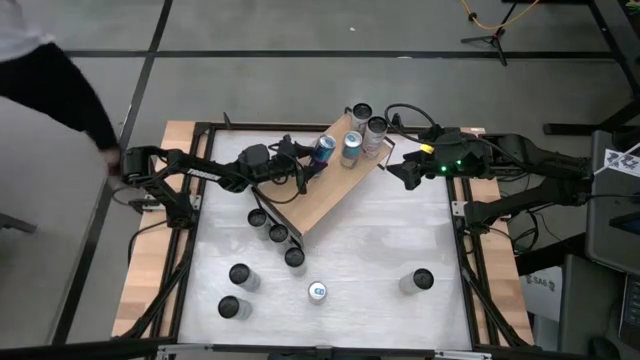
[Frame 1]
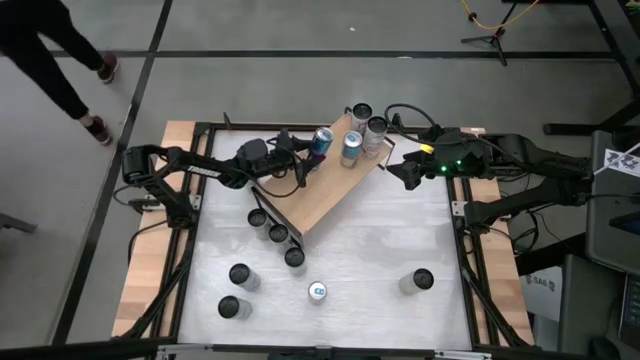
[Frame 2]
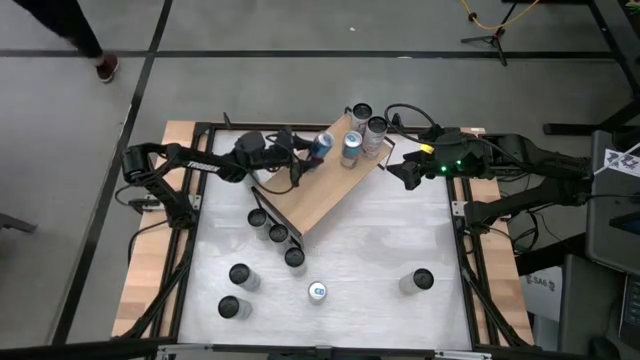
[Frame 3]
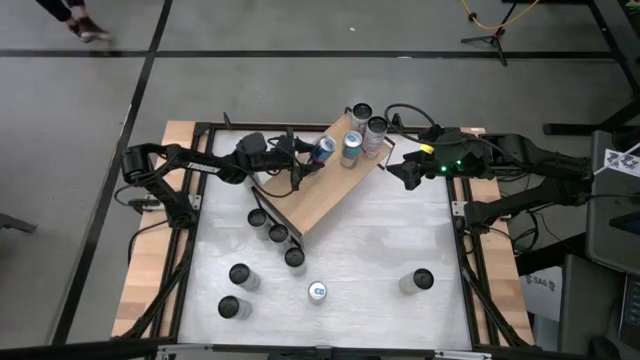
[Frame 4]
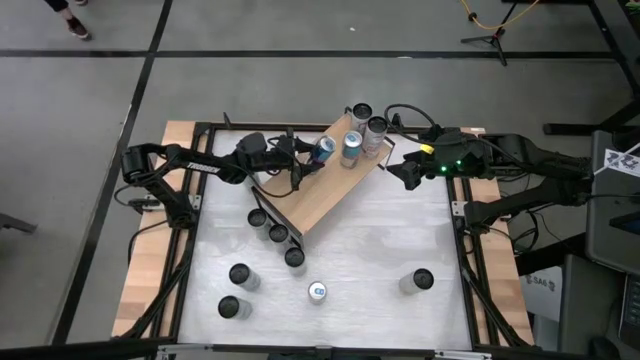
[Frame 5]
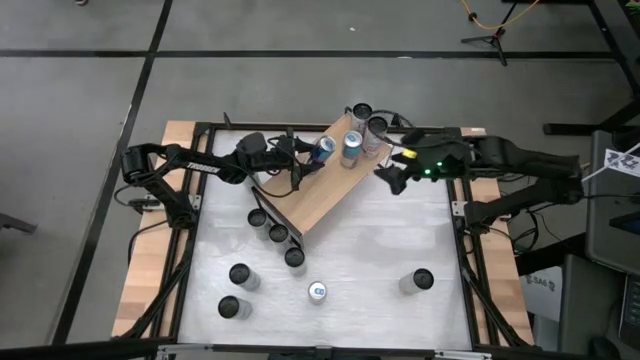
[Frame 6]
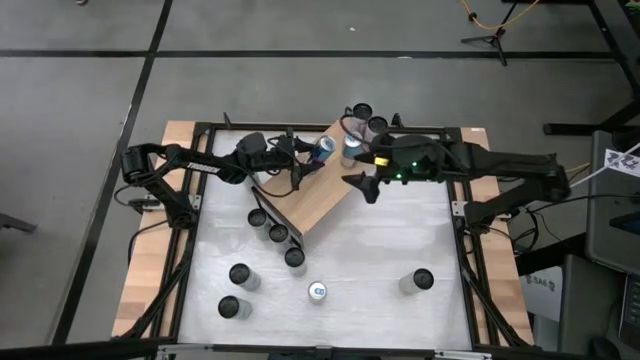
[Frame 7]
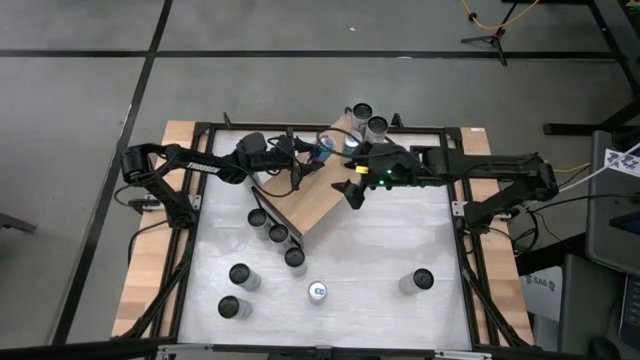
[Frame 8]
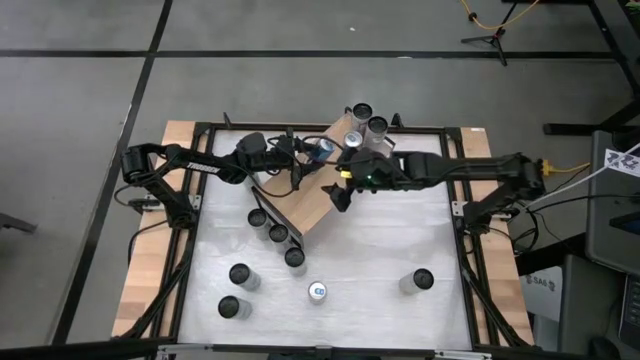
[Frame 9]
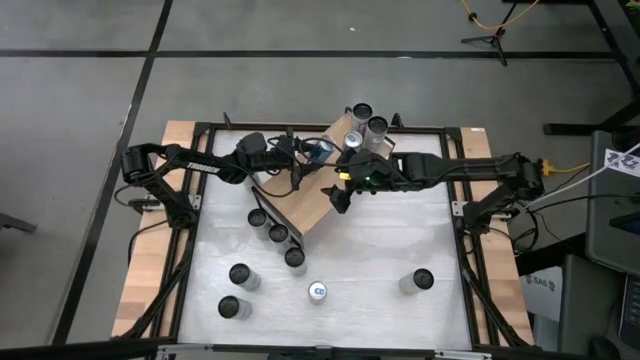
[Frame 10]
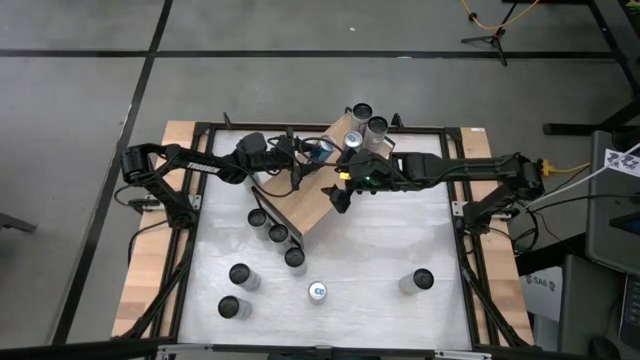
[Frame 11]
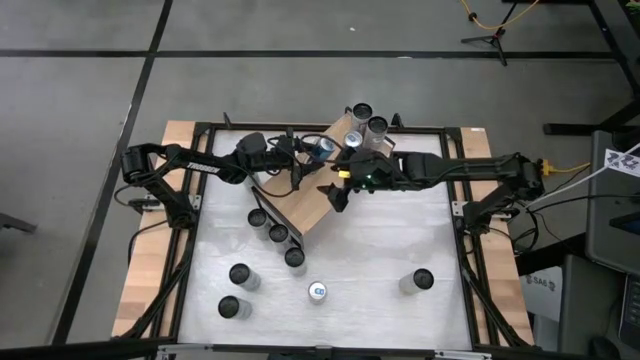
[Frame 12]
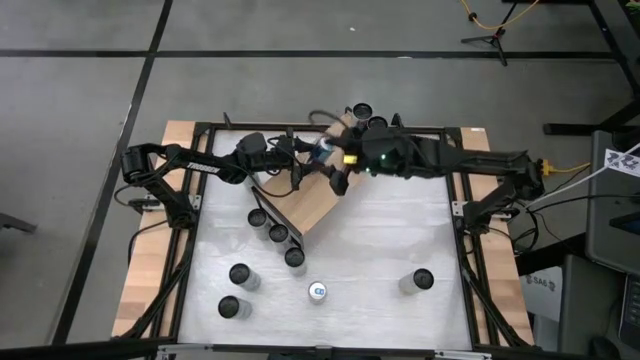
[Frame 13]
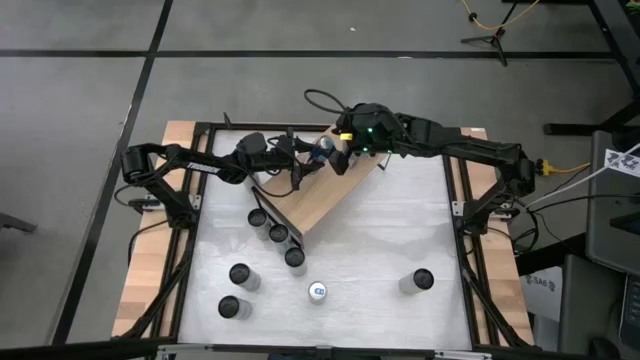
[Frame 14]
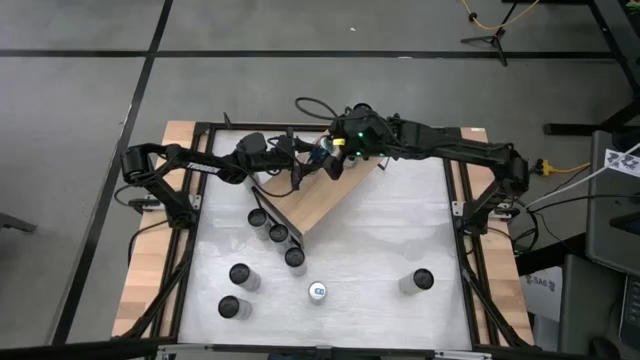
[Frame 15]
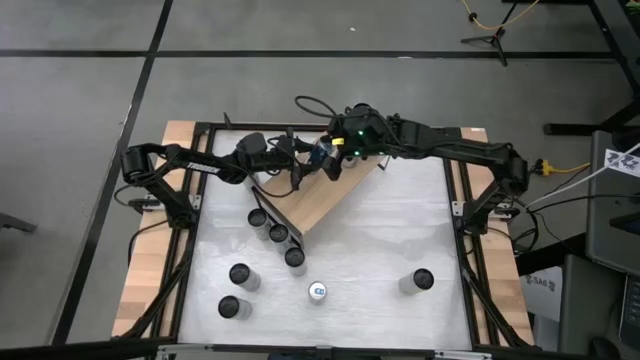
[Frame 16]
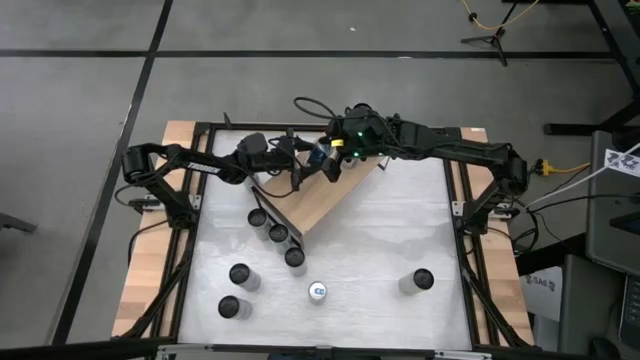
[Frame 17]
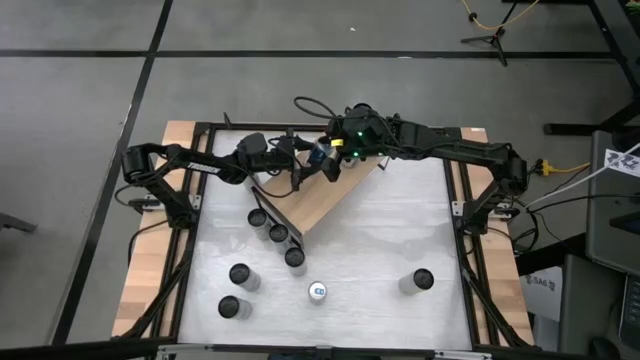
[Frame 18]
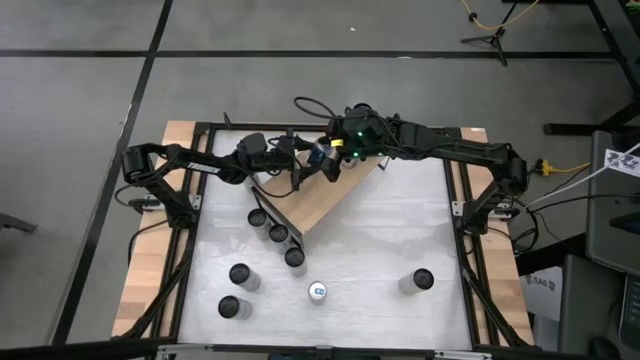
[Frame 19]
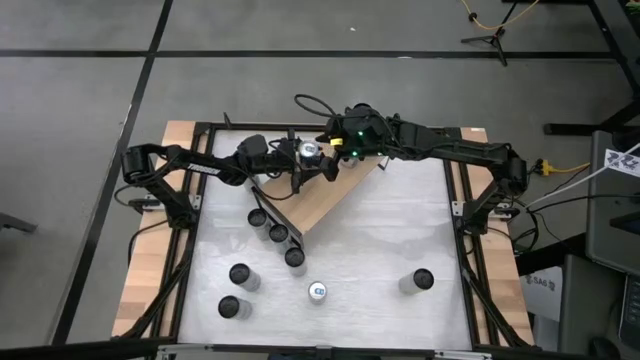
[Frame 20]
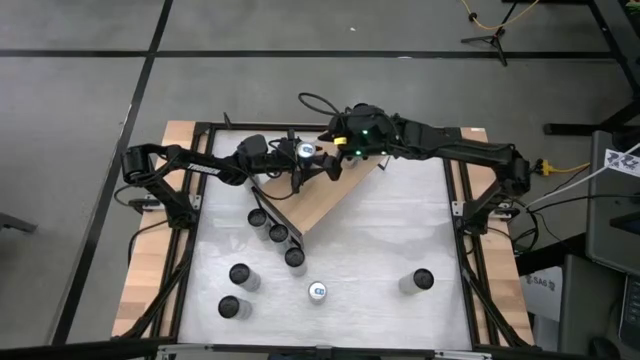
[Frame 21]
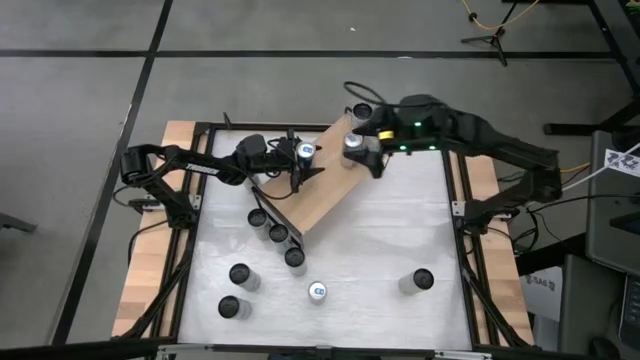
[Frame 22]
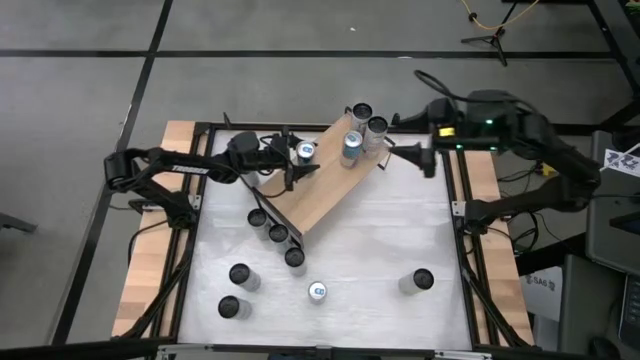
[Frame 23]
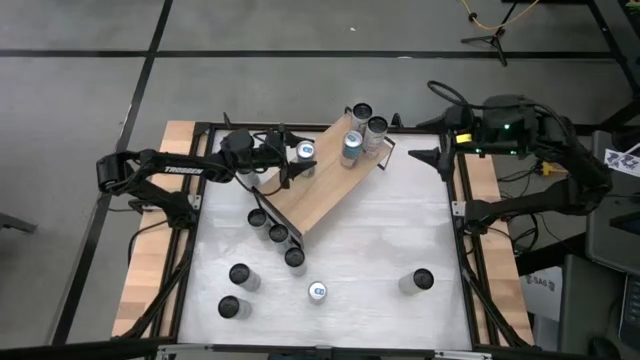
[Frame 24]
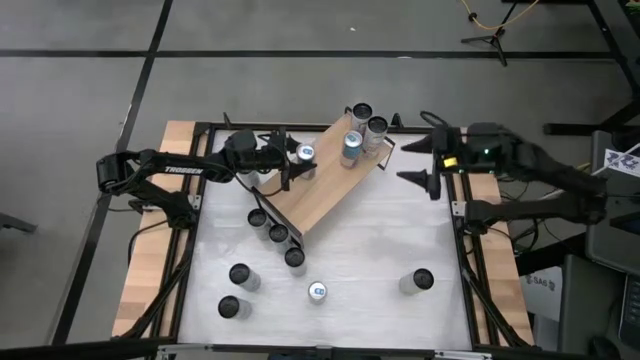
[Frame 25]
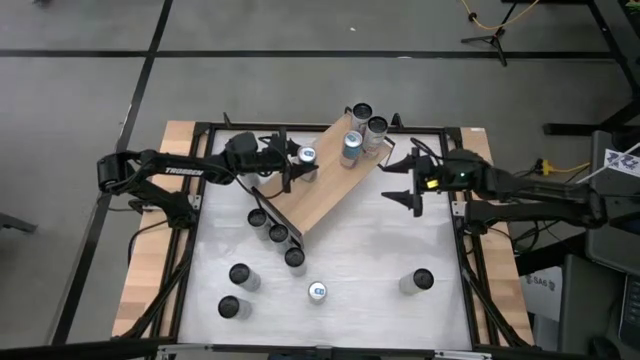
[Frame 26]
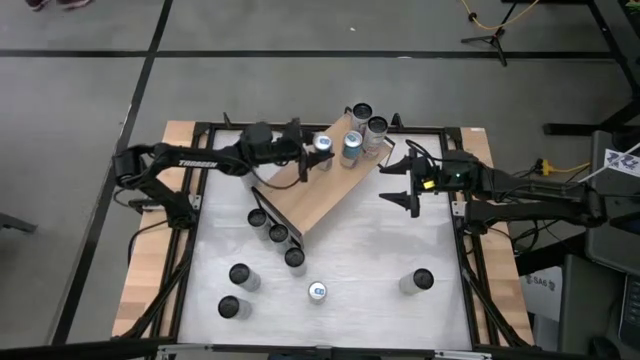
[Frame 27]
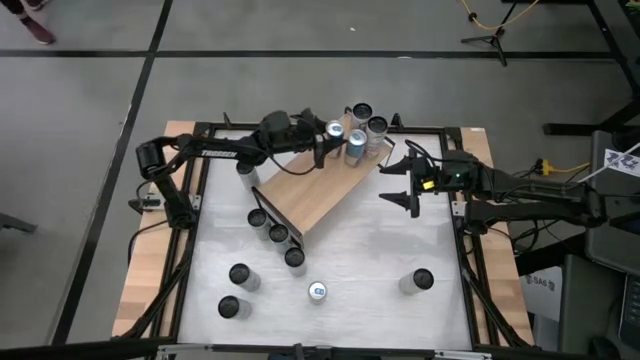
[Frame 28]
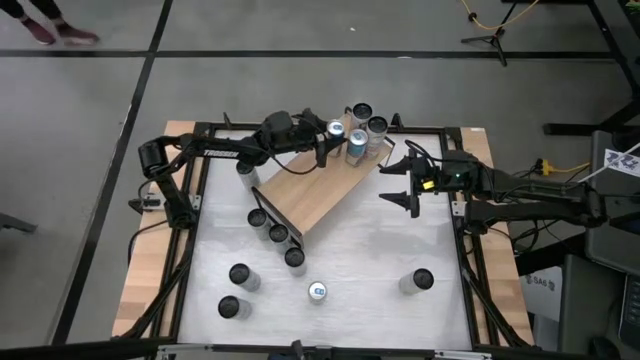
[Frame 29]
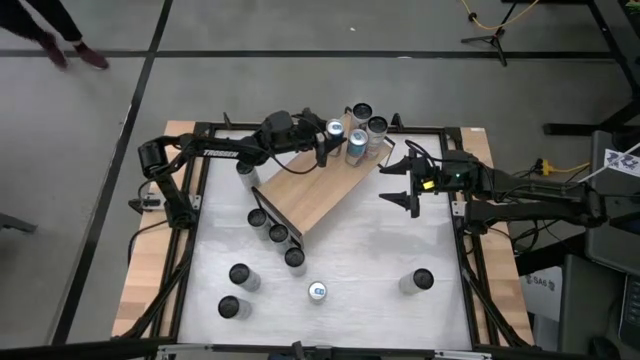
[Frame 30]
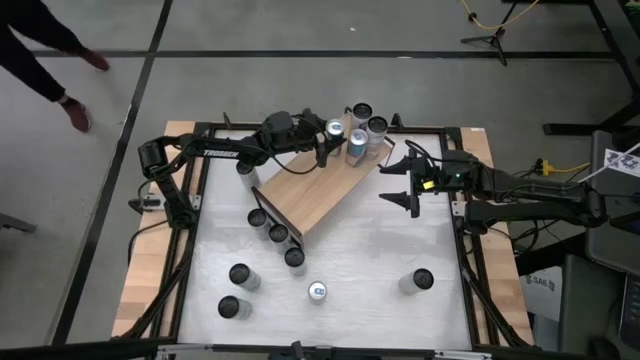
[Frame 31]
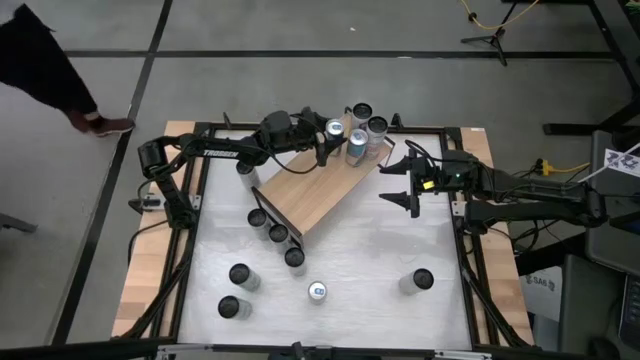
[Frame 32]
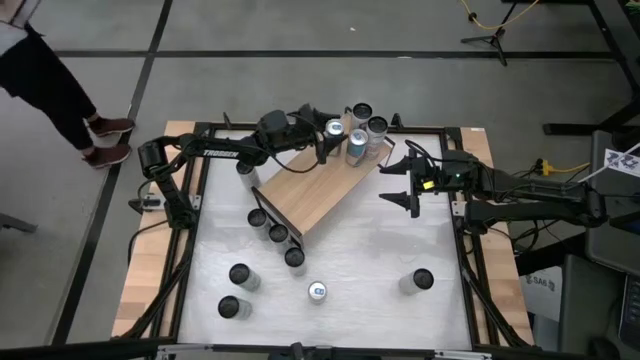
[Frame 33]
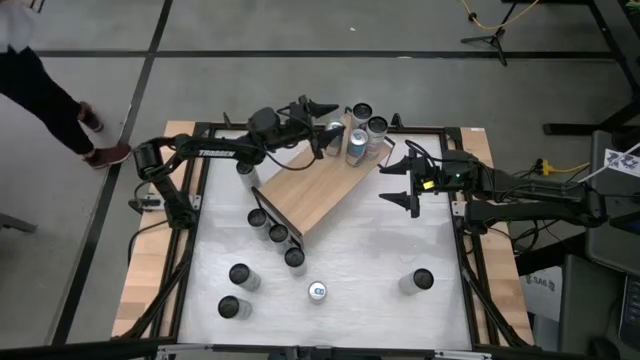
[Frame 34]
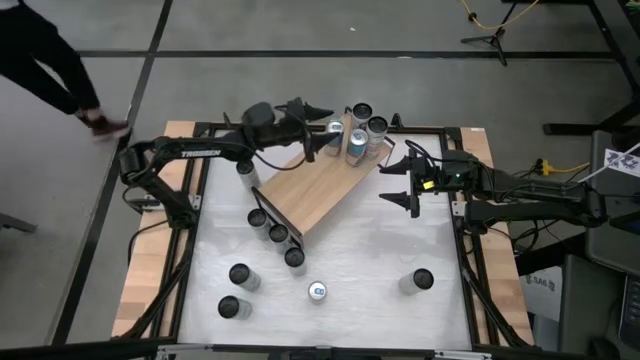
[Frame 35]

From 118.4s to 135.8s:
Task: Place canned beverage on shelf
Put the blue soda can on the shelf aligned with the other blue soda can
